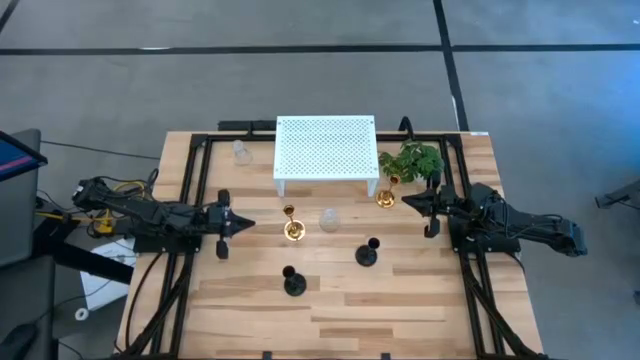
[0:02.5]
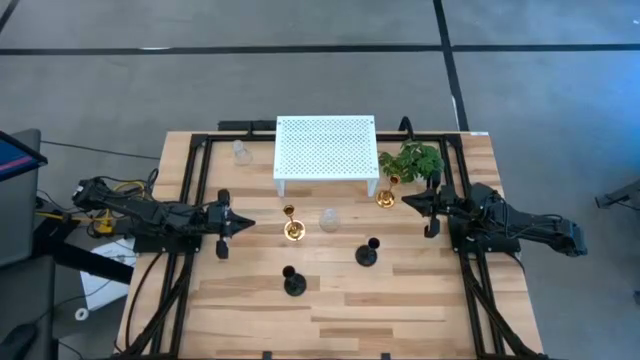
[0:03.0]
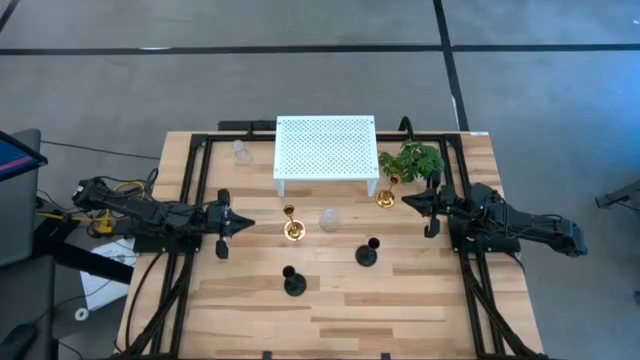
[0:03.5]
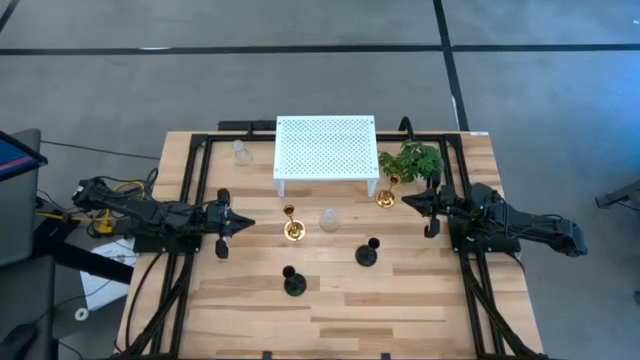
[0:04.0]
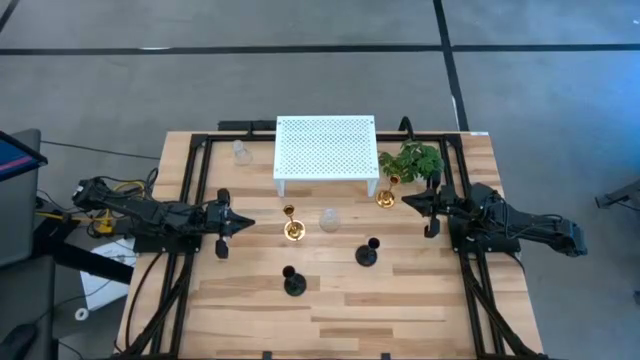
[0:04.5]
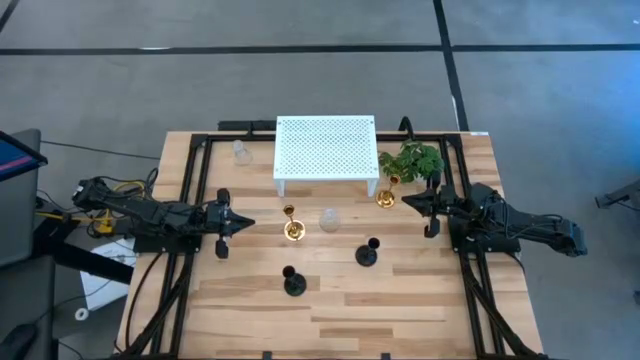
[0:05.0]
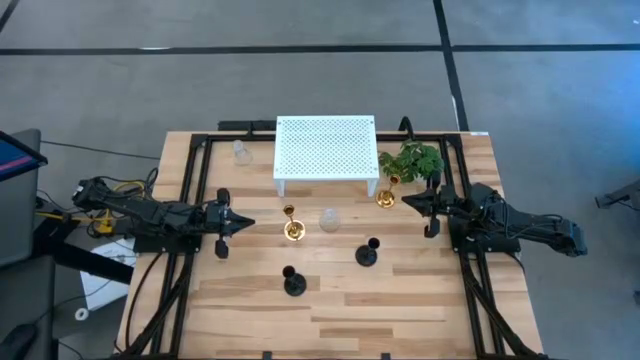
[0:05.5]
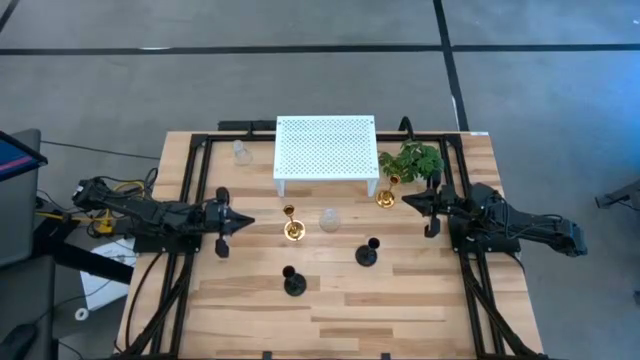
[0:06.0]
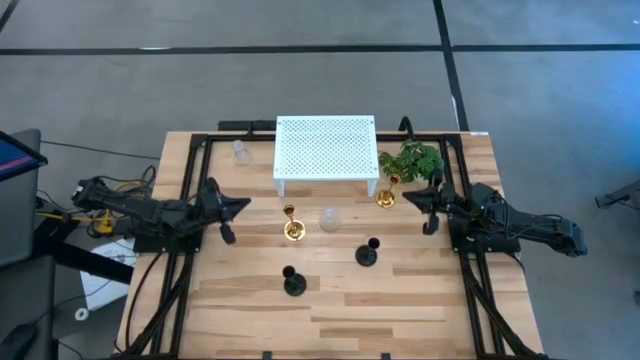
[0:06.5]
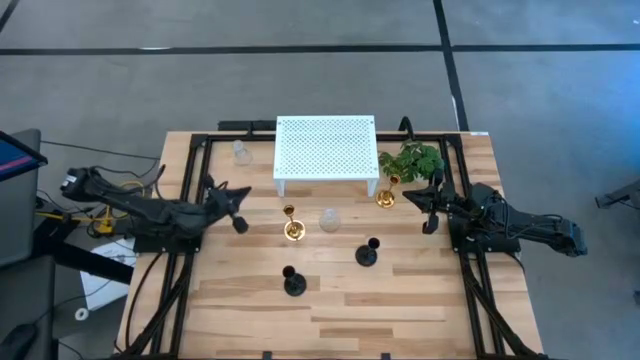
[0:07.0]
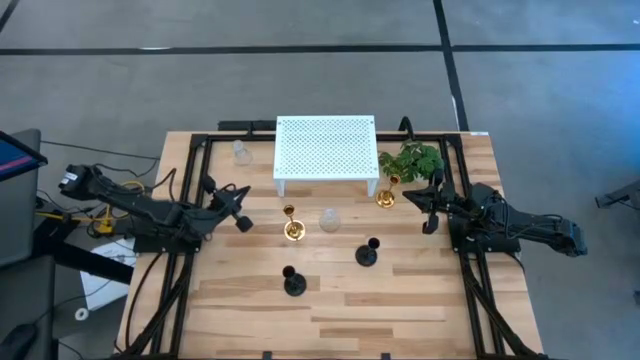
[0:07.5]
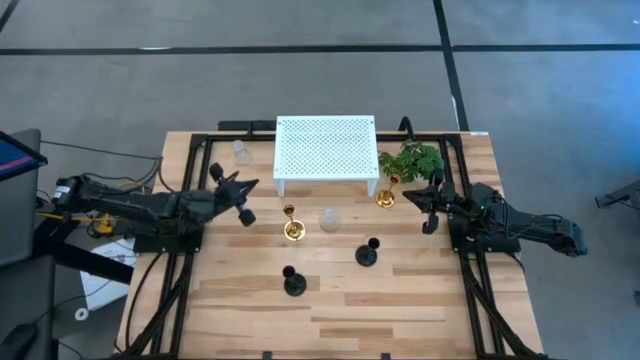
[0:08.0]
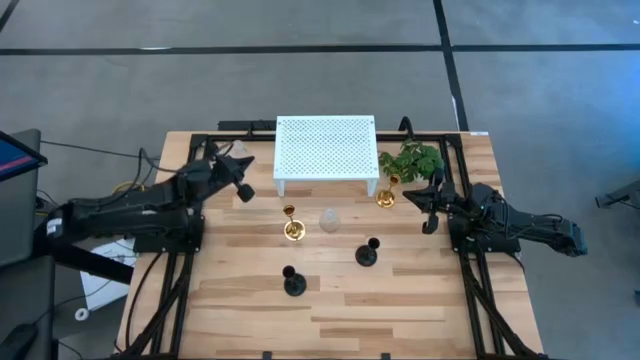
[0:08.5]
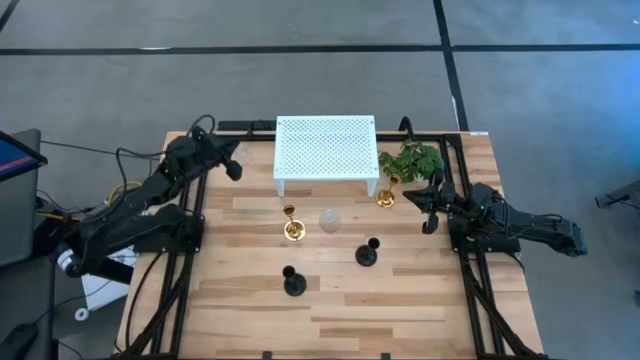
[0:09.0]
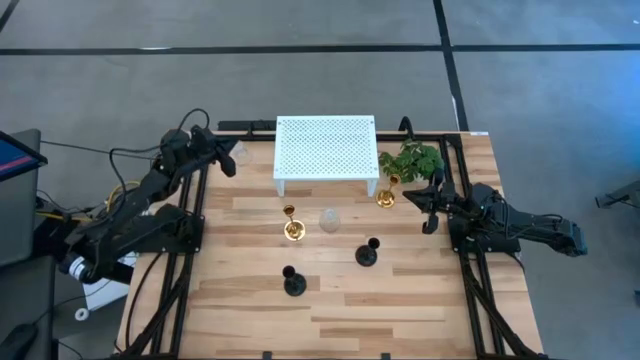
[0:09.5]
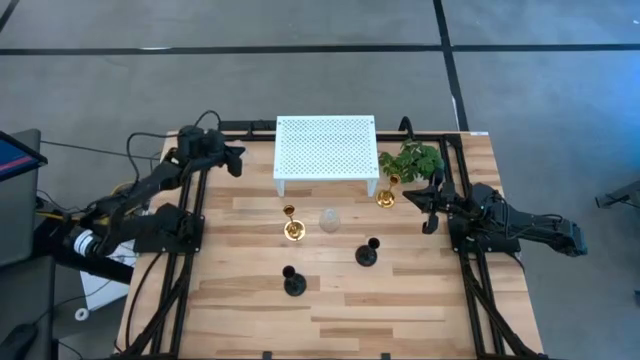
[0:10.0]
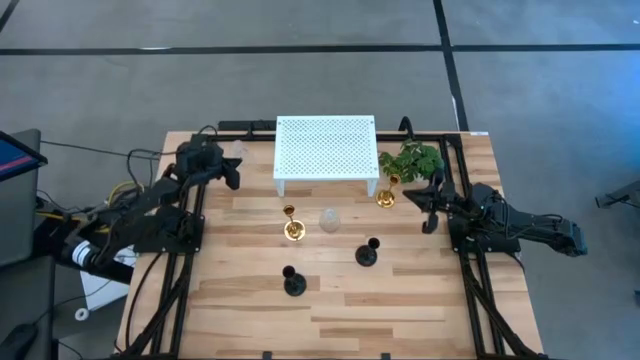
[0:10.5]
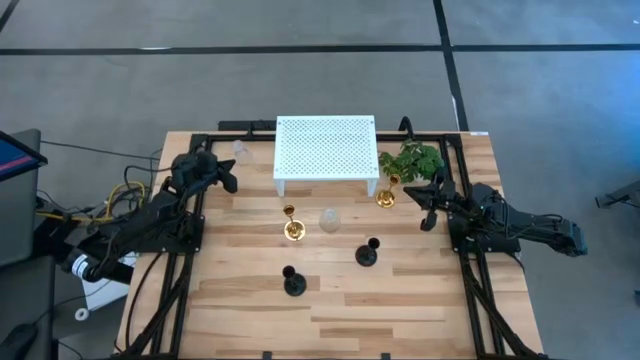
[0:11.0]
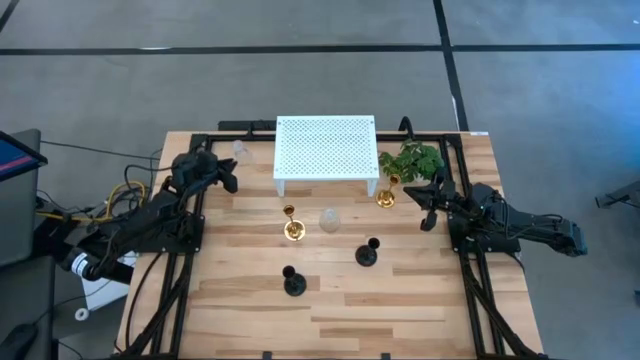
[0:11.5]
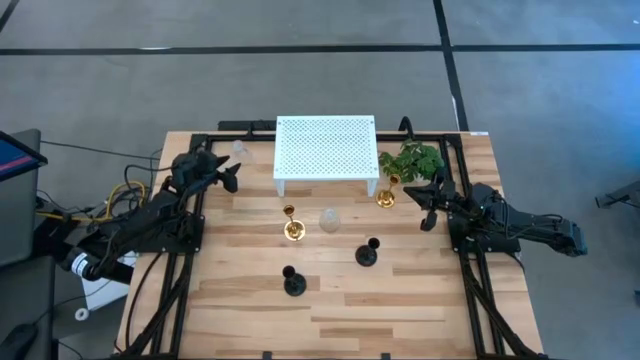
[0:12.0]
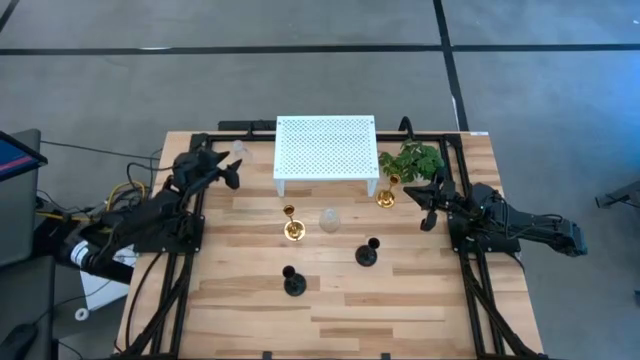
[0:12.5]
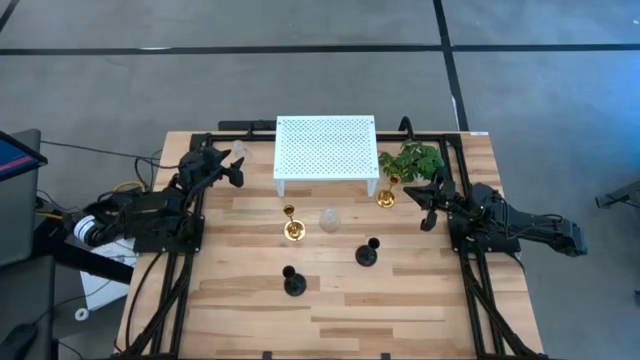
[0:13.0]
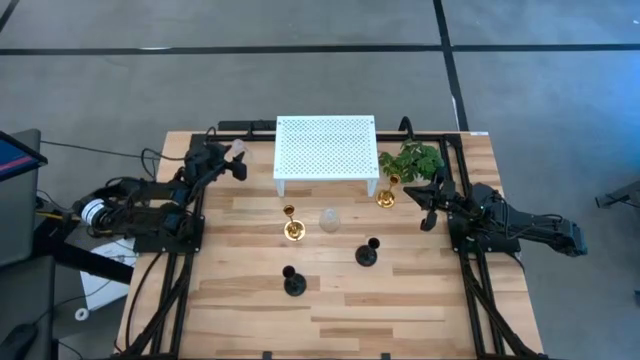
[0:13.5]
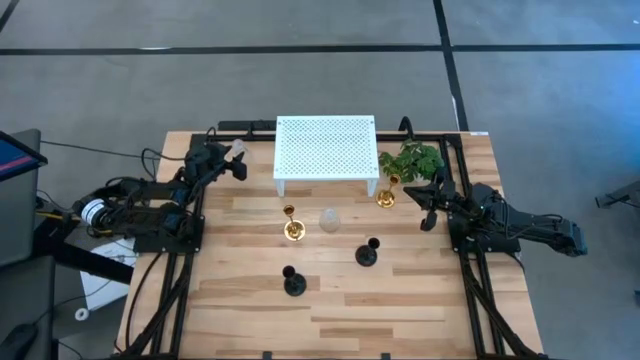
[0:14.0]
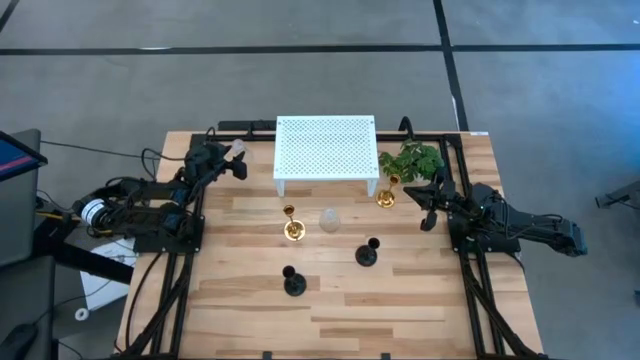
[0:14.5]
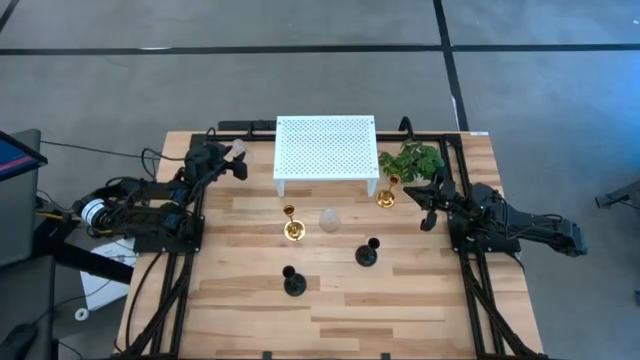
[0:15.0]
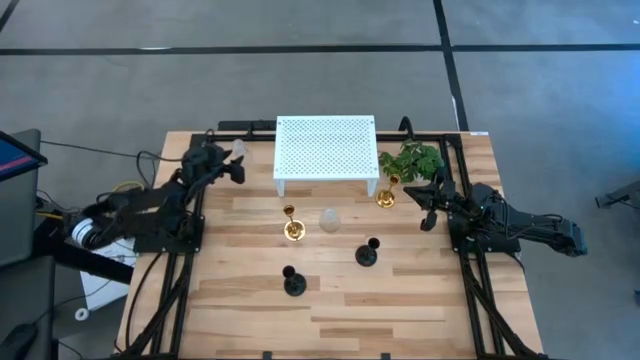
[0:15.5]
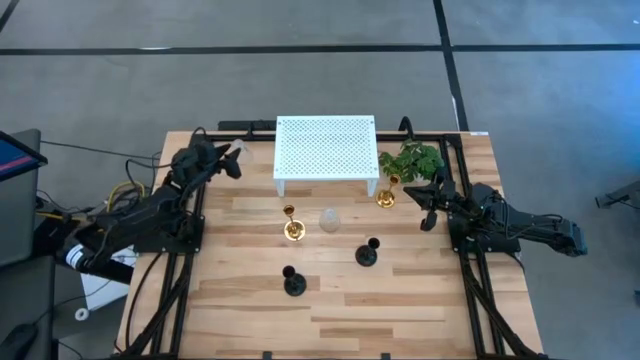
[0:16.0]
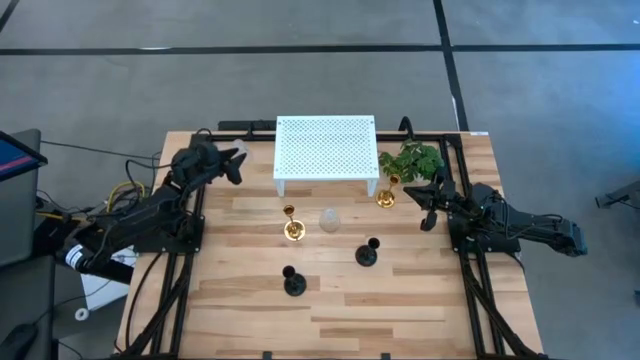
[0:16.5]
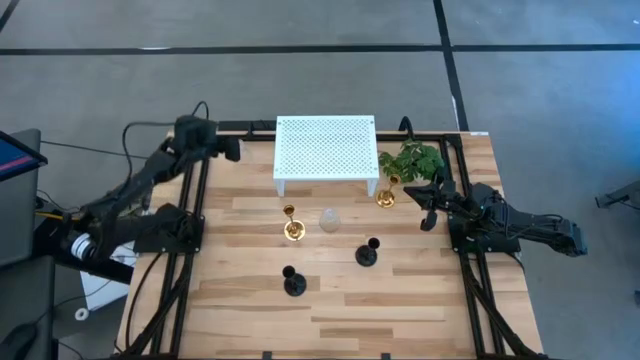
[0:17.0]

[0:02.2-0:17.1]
Task: Pick & Place candle stick holders
Put the top transparent candle holder on the shelf

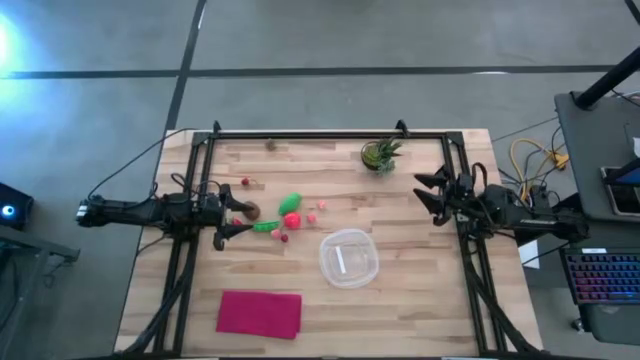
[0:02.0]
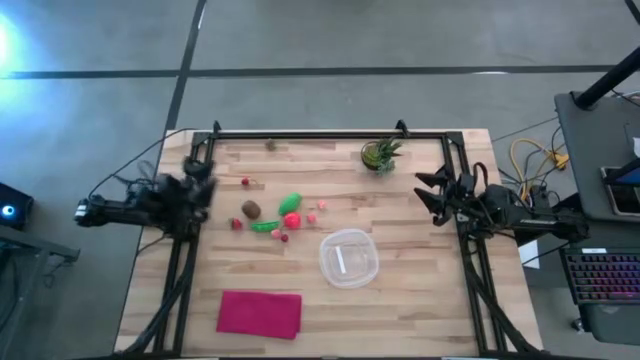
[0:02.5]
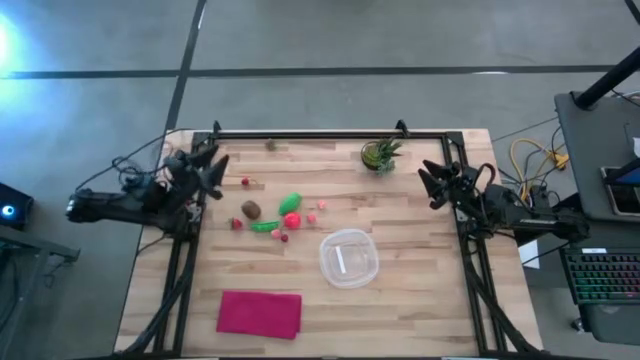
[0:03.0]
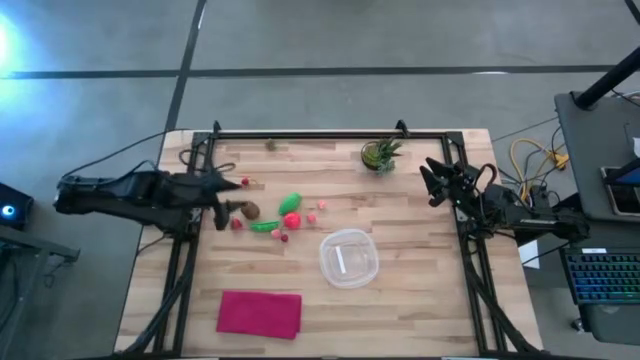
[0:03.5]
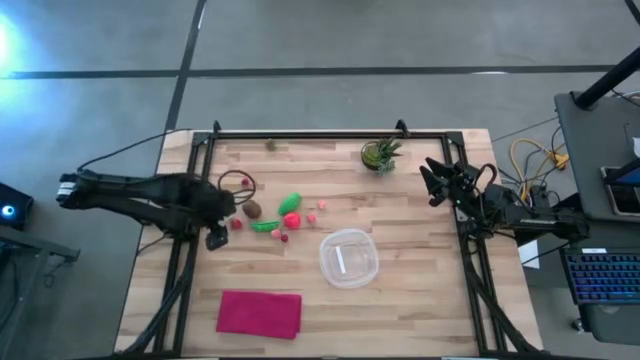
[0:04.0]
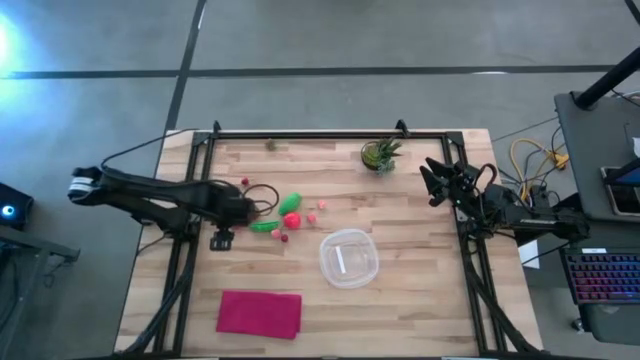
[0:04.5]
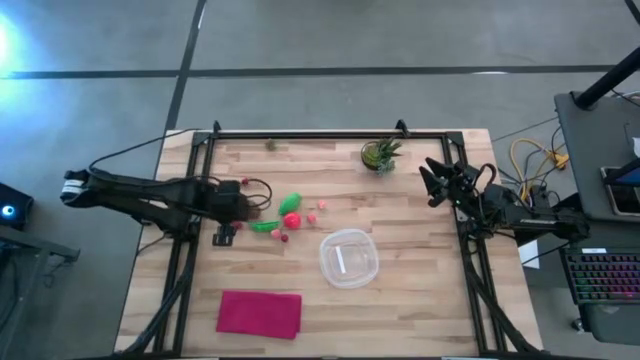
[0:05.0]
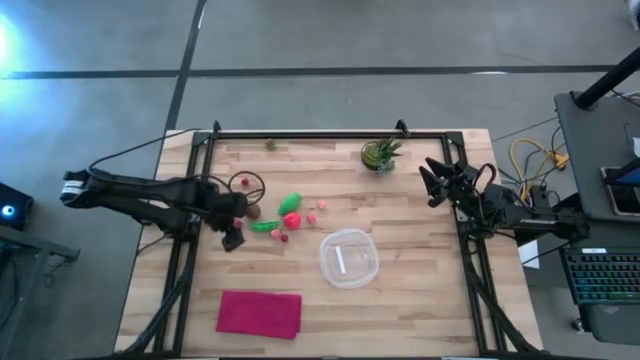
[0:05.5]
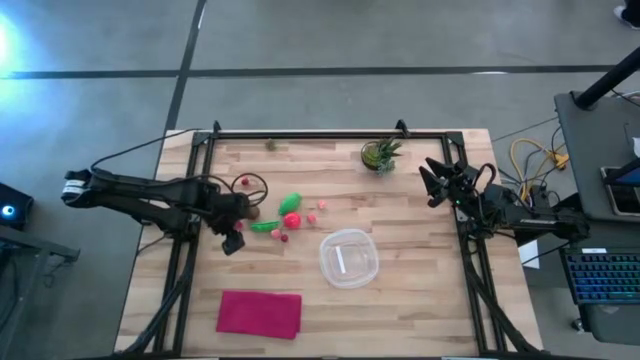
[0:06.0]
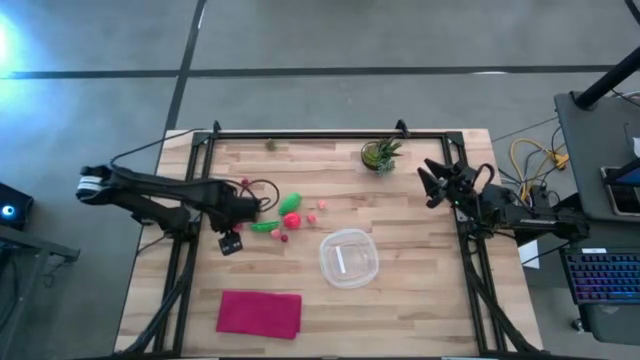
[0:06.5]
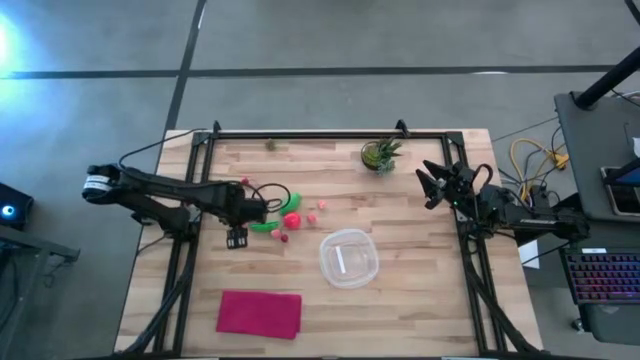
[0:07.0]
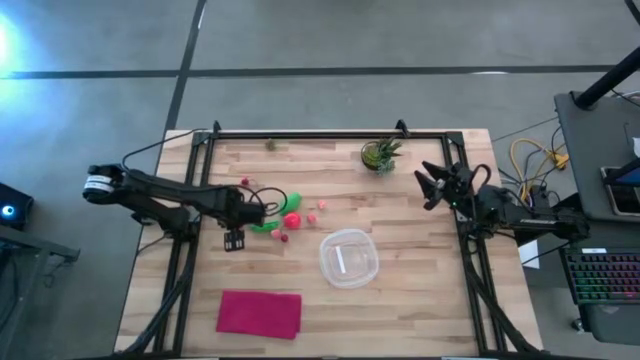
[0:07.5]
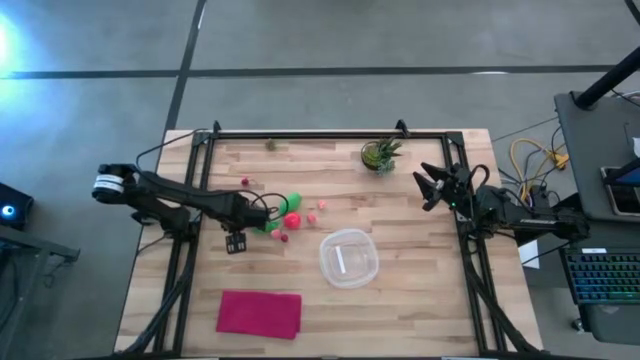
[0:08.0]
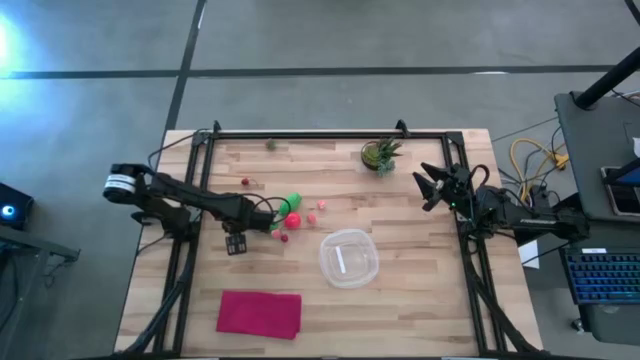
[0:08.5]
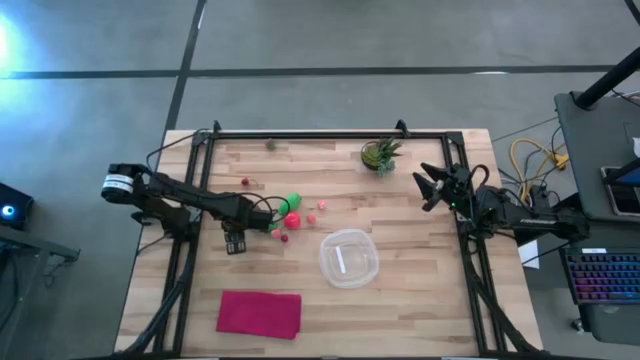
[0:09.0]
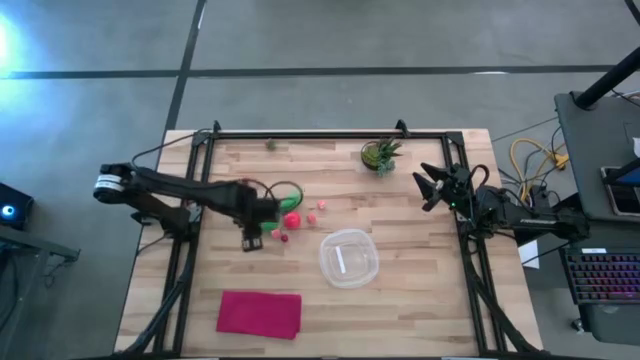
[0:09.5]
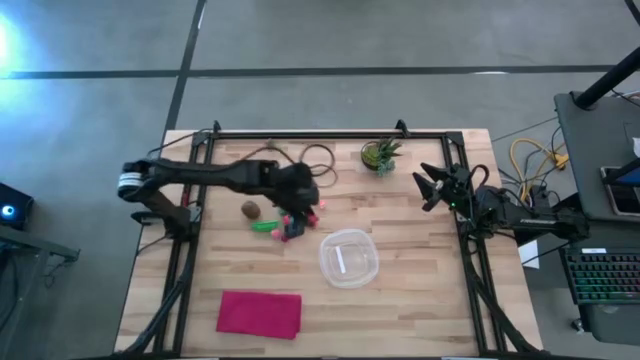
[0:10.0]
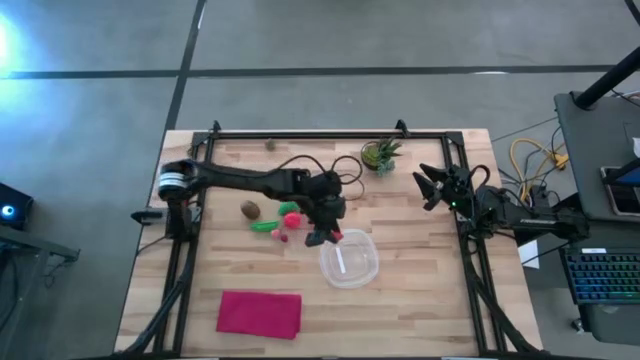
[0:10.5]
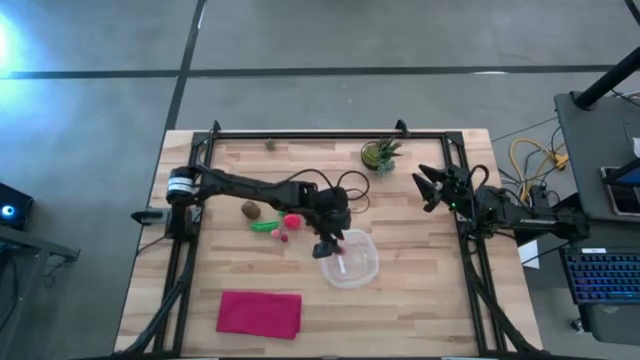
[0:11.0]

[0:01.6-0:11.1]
Task: Pick and placing Produce into tupperware
Put the bottom strawberry into the container
